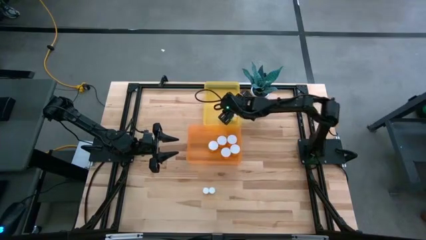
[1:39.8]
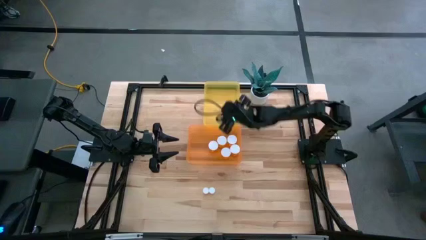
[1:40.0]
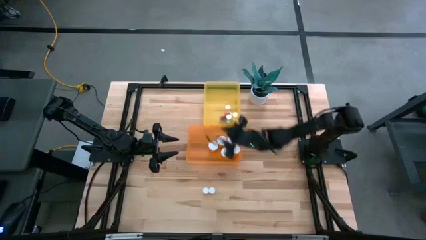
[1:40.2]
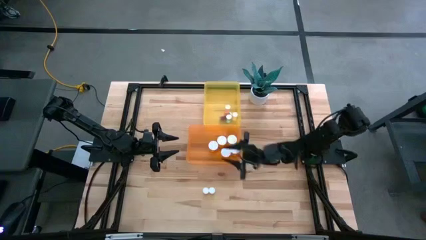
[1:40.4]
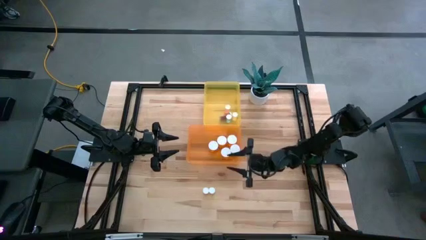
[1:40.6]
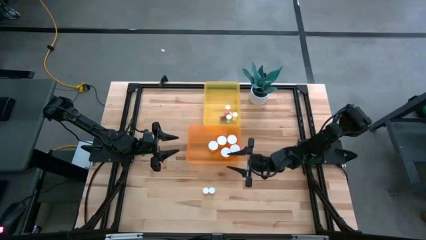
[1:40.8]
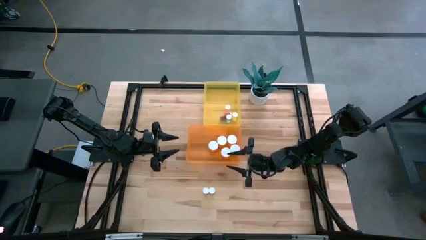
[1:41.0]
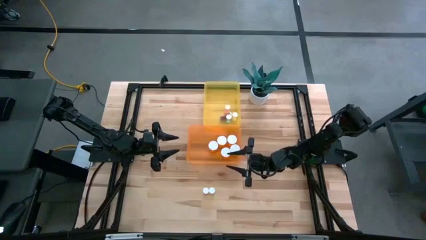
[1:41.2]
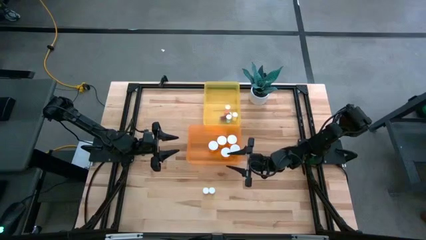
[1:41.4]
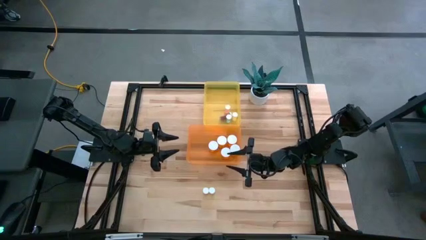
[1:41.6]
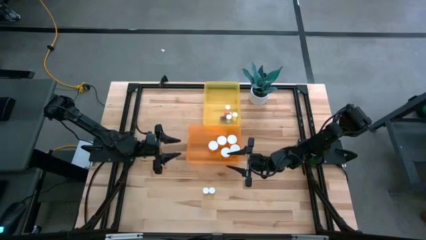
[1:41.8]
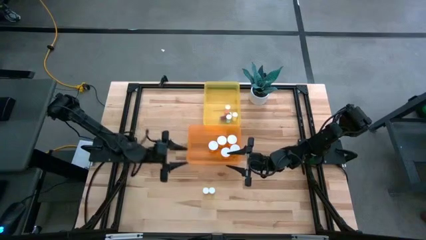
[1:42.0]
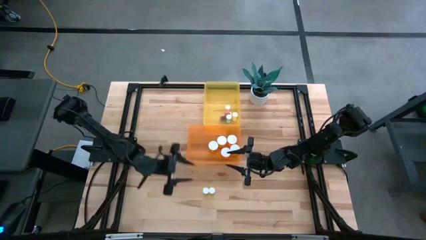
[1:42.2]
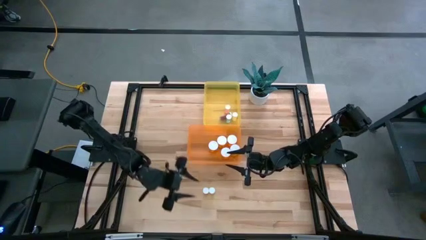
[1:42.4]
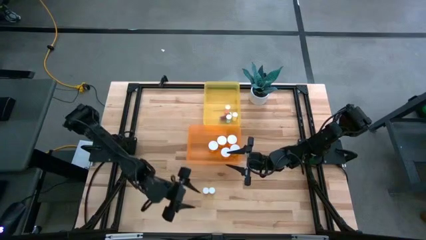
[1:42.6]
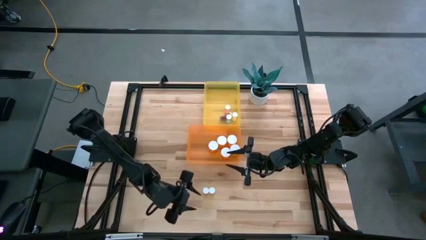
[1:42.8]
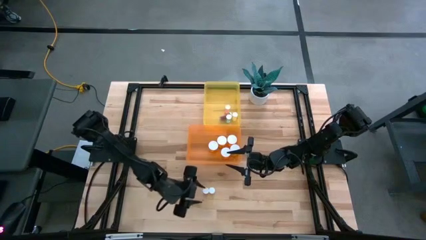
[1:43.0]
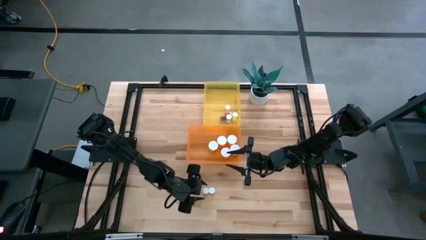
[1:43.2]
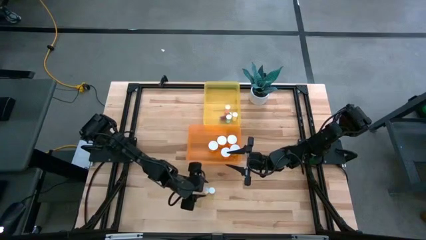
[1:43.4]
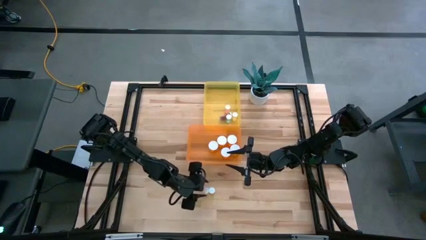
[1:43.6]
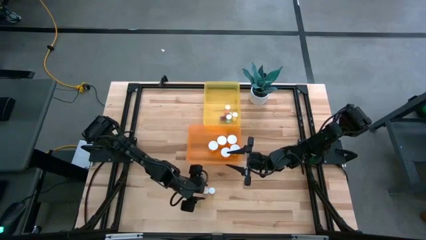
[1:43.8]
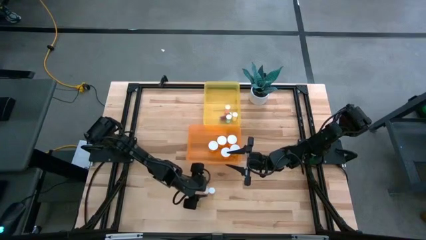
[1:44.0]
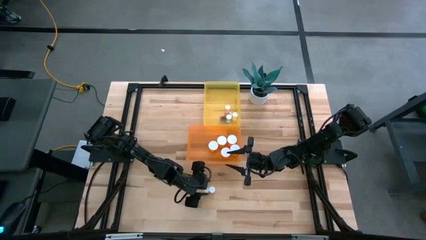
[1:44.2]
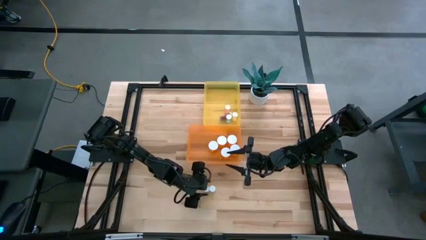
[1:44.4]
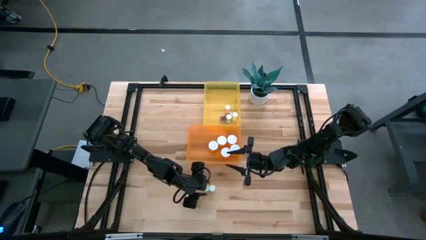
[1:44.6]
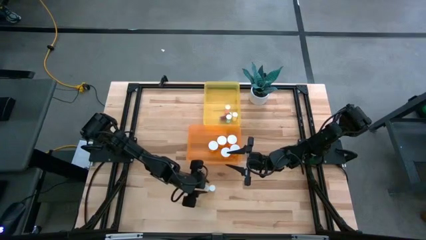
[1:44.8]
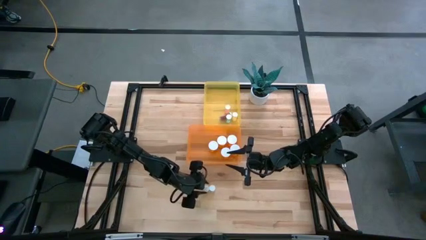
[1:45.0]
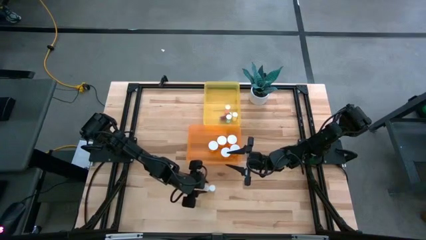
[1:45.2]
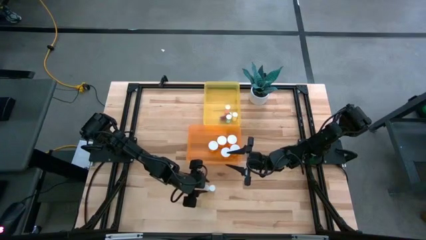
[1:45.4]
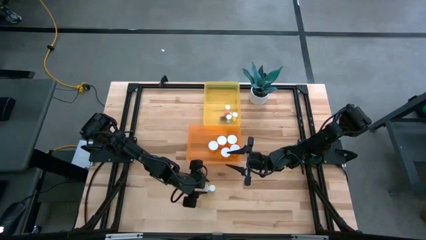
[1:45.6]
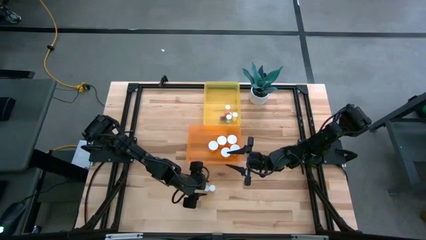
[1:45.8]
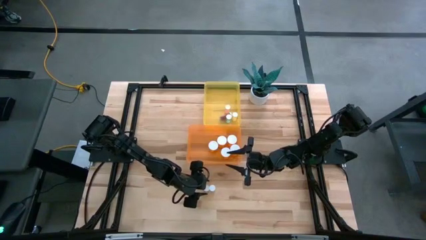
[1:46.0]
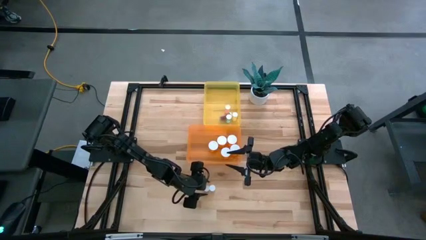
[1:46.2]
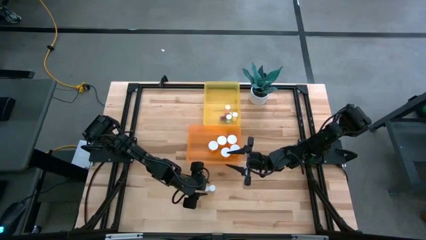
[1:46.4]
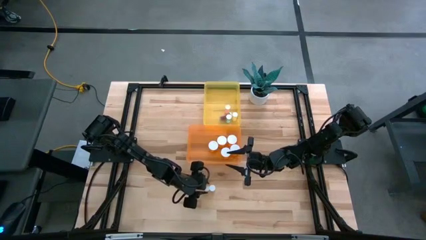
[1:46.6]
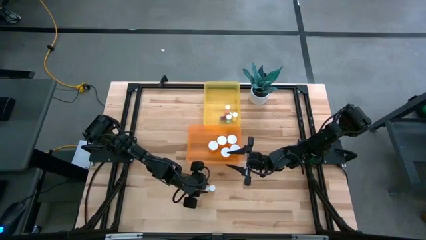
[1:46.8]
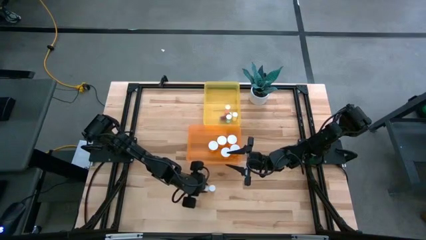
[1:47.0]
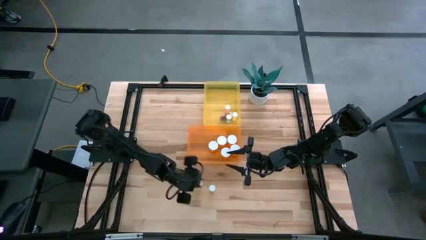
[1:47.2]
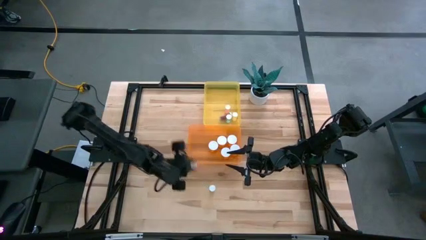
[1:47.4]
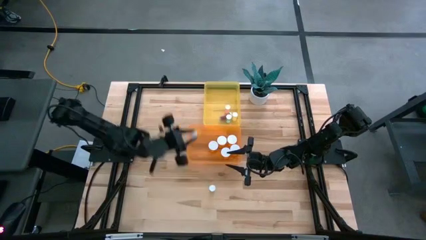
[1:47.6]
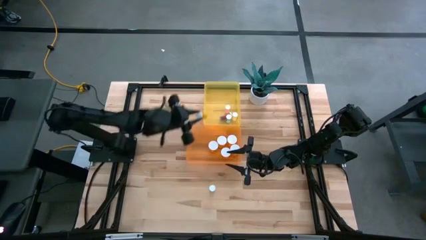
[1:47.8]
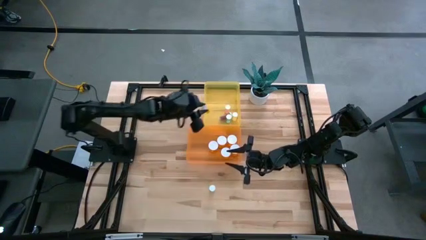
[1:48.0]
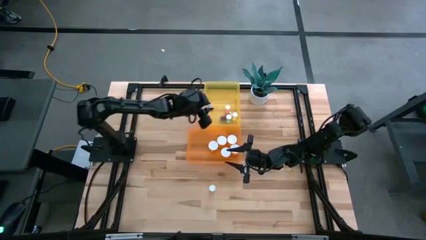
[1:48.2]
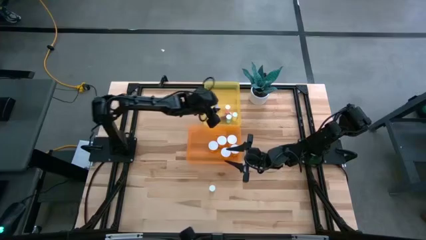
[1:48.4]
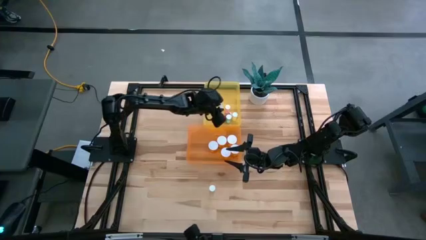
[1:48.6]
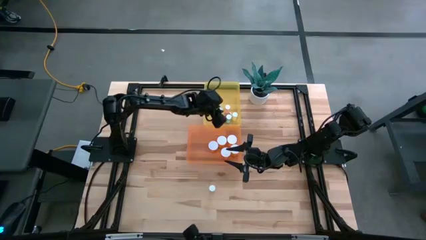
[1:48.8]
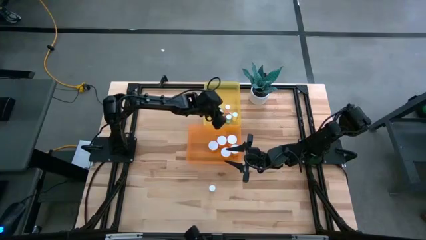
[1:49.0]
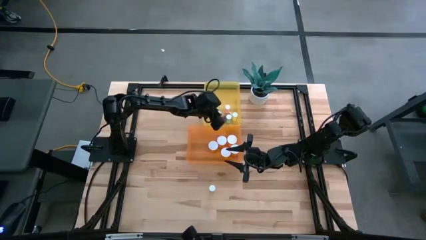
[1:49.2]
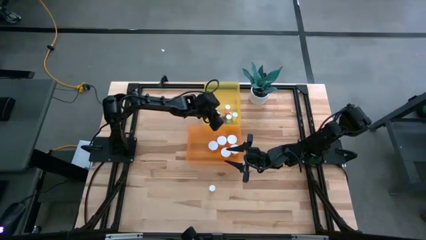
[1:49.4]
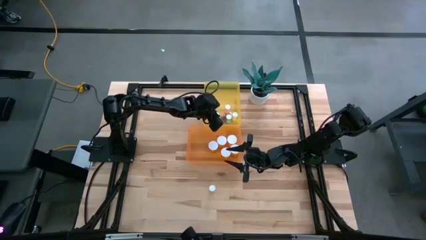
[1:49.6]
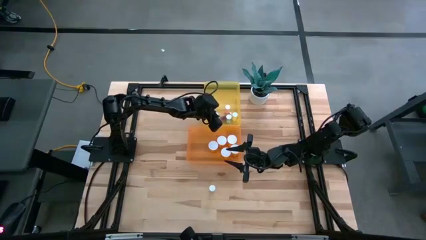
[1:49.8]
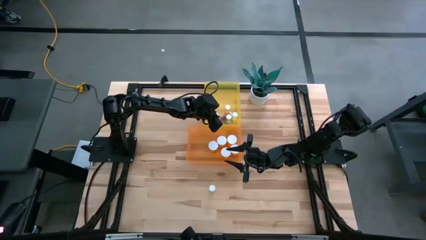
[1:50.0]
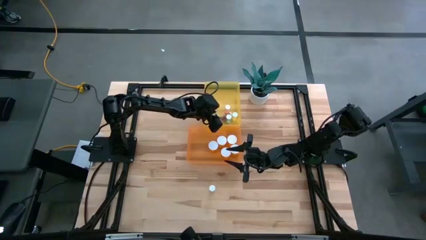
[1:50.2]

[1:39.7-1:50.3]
Task: Pick and place medicine bottles into bin by pill shape (circle, oval)
Put the small orange pill bottle into the yellow bin

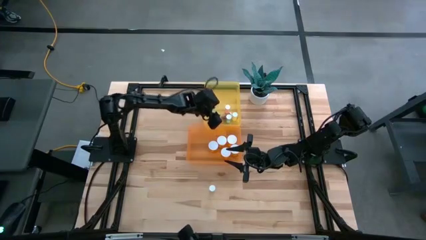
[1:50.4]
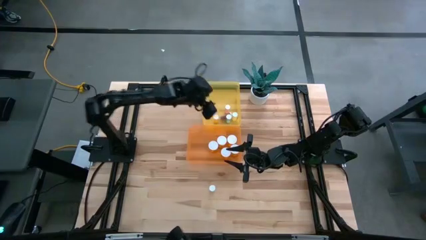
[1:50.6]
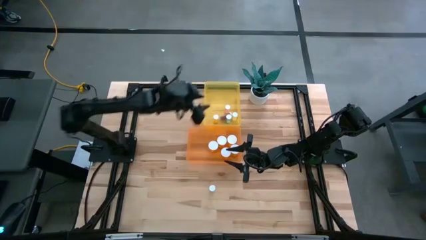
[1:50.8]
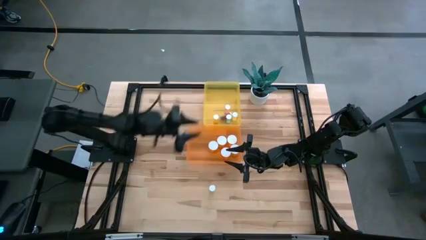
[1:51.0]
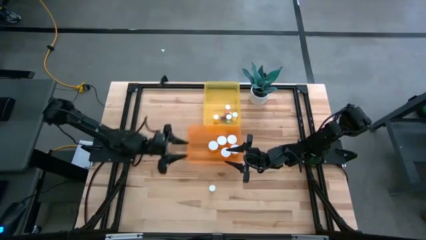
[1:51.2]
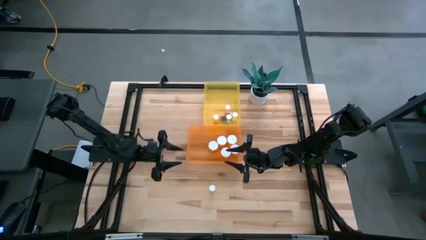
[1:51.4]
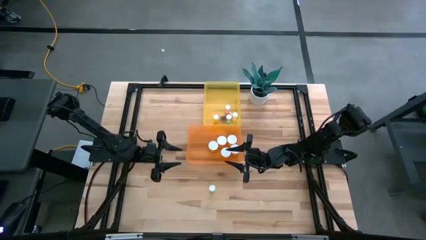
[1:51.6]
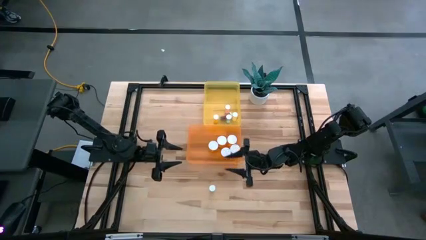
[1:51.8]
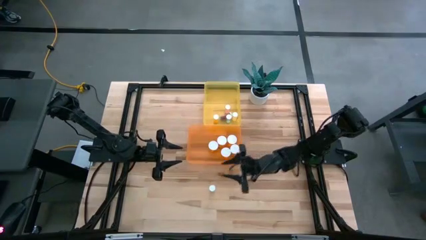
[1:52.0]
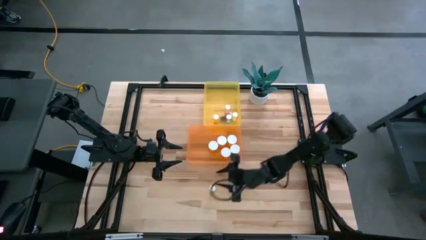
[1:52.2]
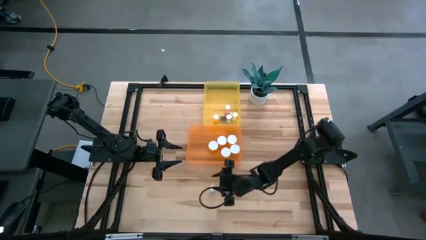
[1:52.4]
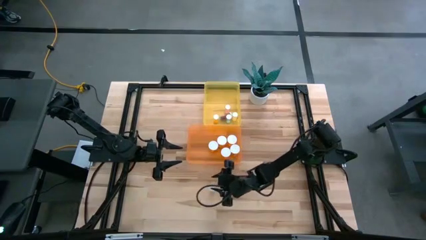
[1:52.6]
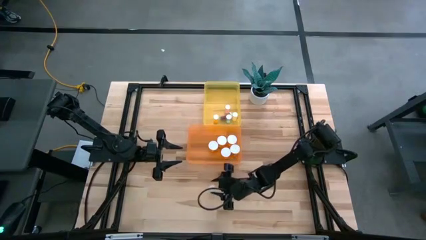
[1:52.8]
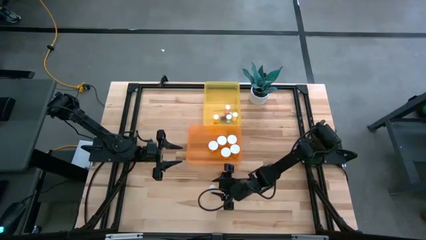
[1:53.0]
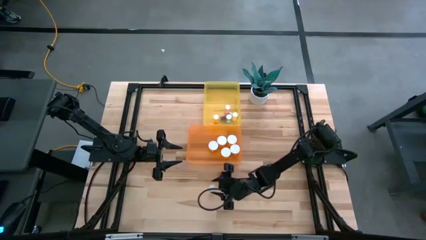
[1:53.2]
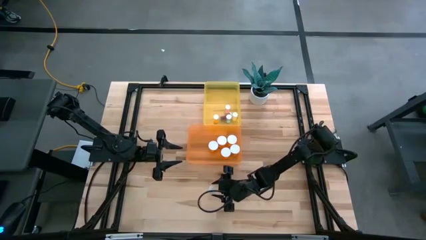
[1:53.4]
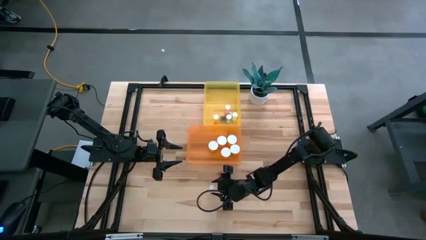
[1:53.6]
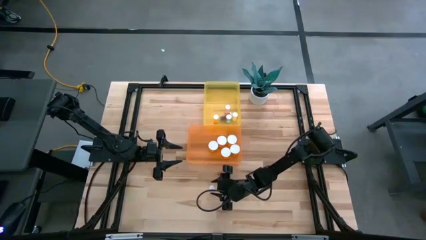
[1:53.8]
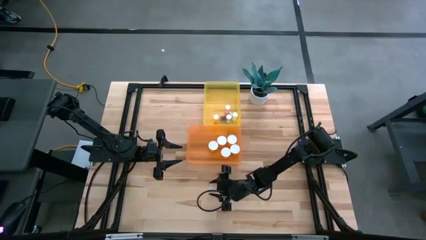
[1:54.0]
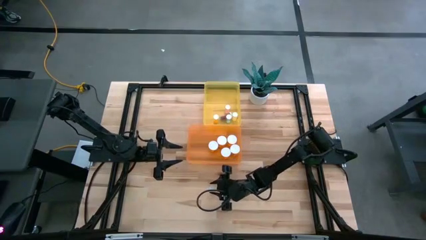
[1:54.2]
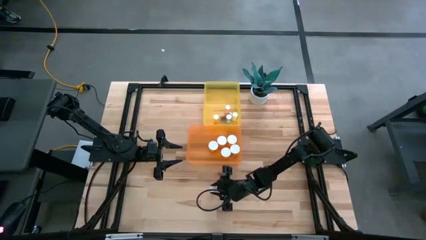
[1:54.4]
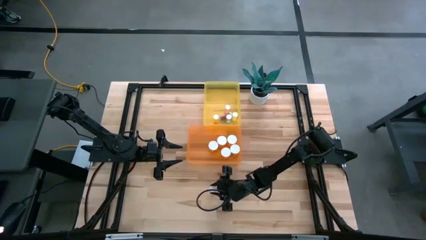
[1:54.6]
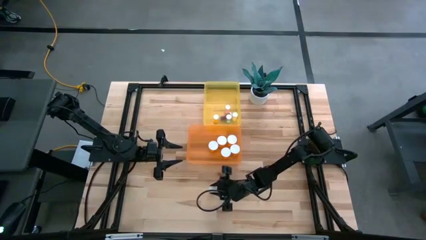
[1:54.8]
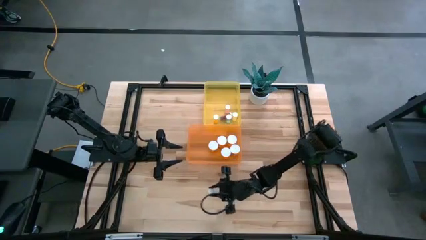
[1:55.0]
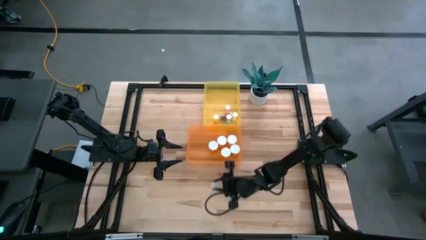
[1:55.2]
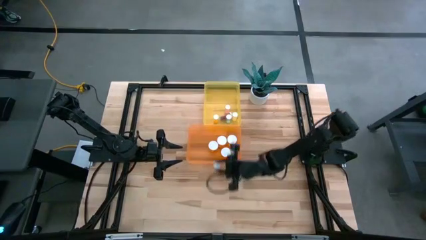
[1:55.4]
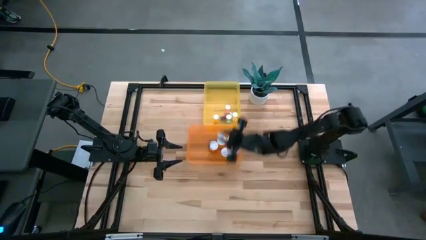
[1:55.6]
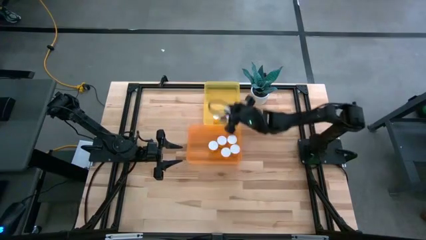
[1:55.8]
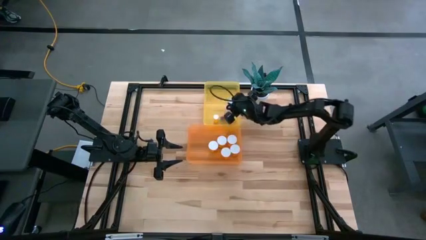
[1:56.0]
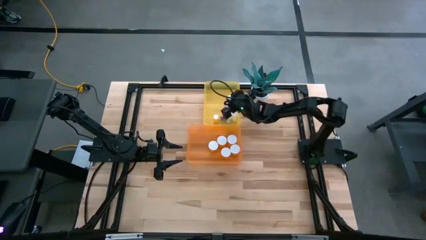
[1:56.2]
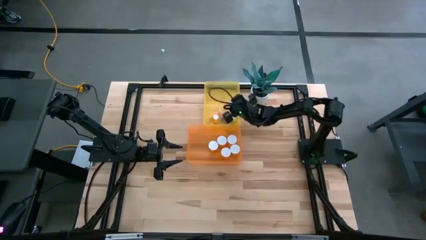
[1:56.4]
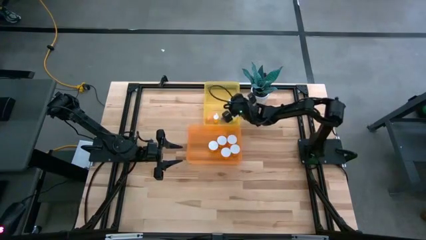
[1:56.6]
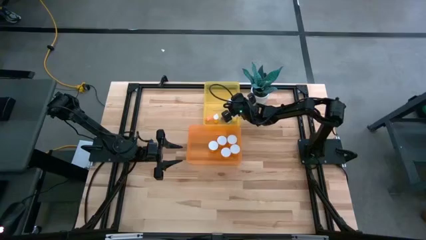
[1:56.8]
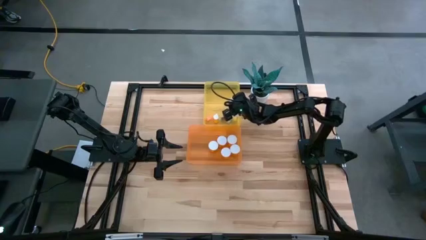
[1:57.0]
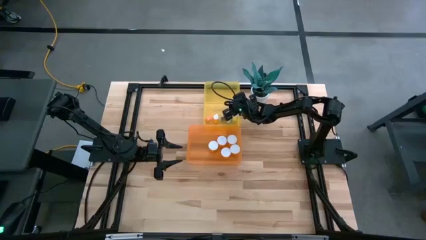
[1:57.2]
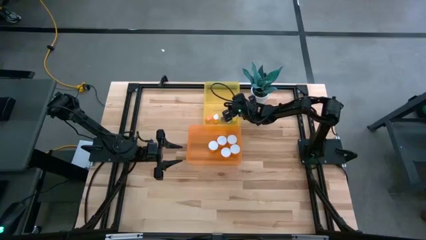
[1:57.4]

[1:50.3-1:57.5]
Put the small yellow pill bottle into the yellow bin
